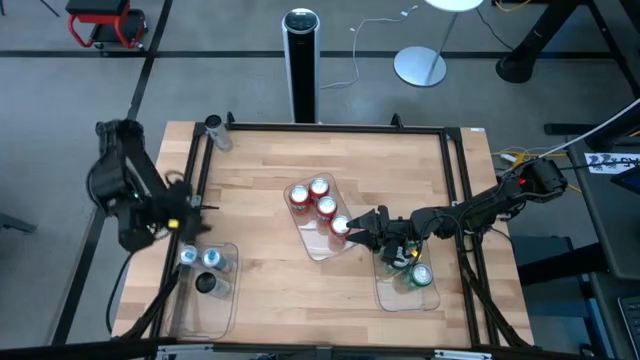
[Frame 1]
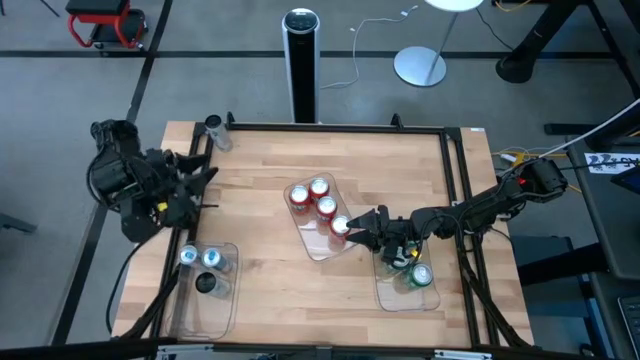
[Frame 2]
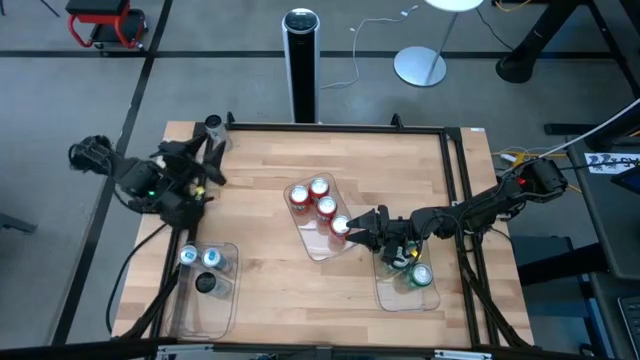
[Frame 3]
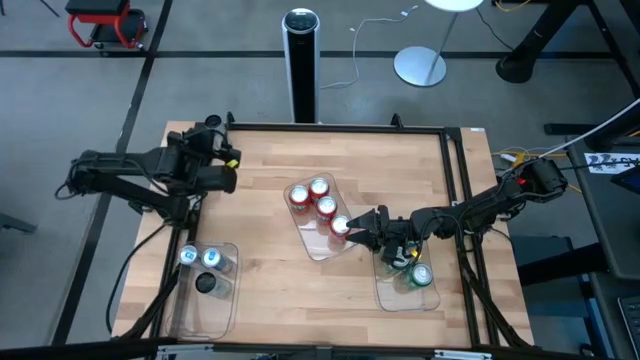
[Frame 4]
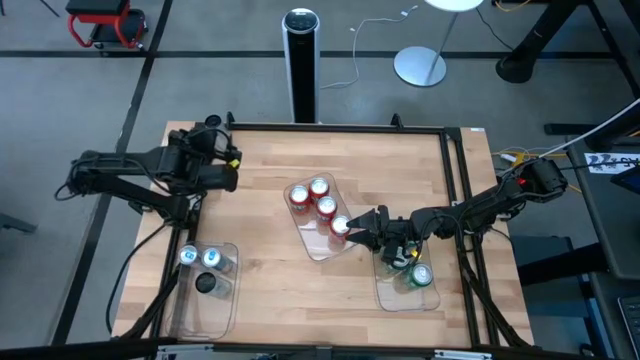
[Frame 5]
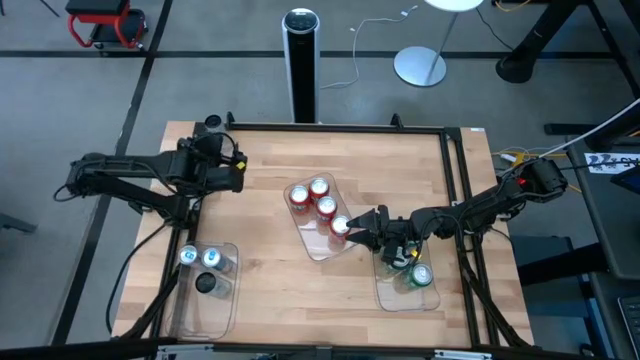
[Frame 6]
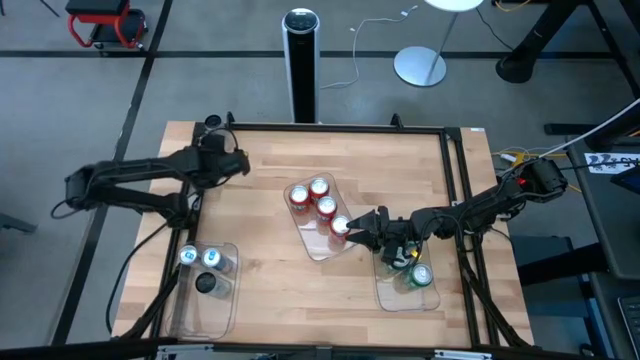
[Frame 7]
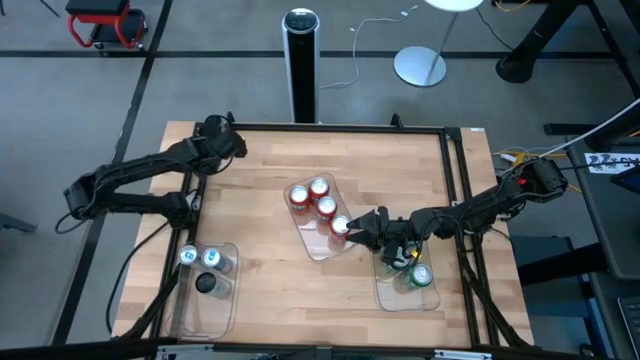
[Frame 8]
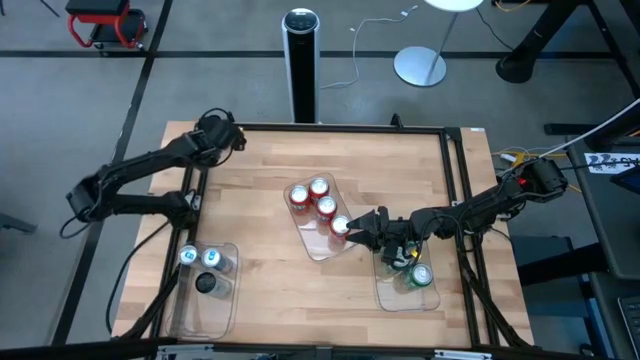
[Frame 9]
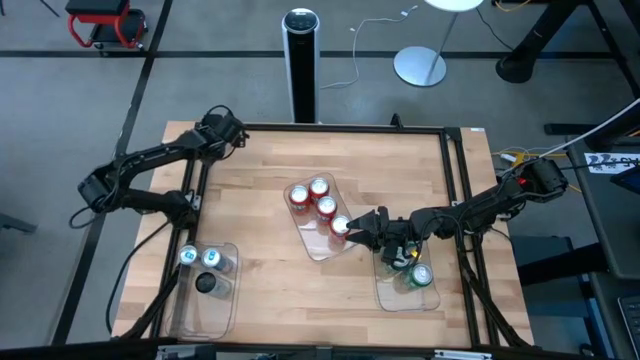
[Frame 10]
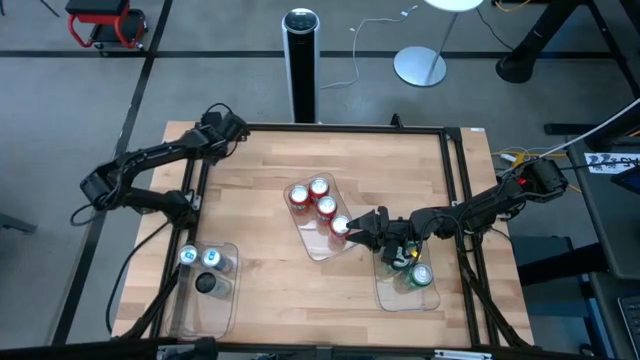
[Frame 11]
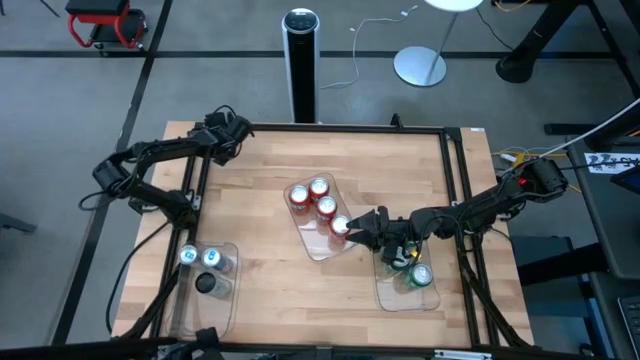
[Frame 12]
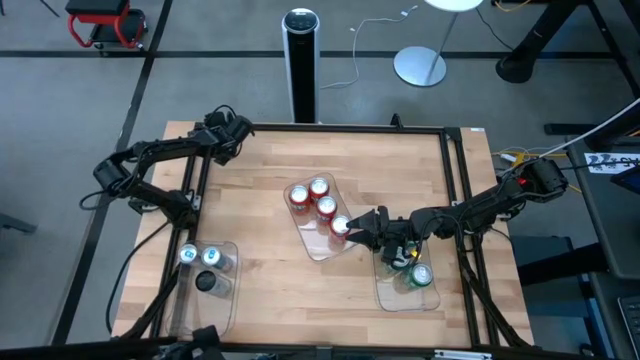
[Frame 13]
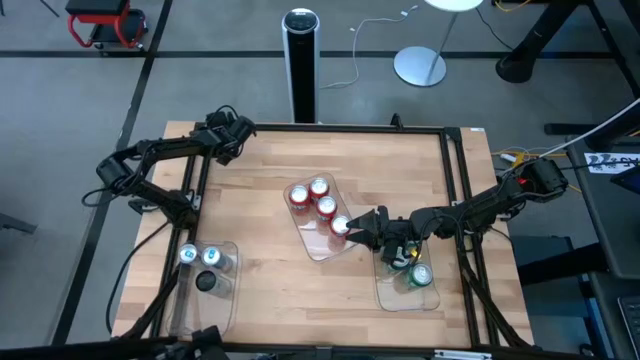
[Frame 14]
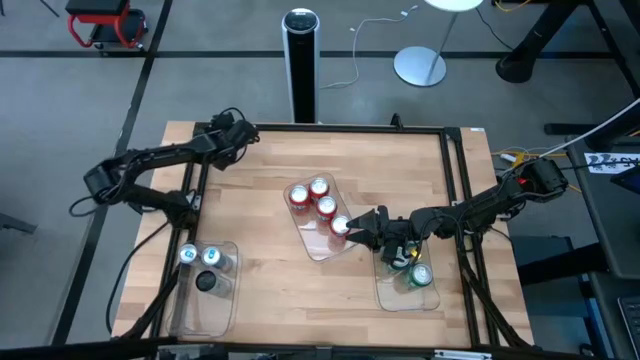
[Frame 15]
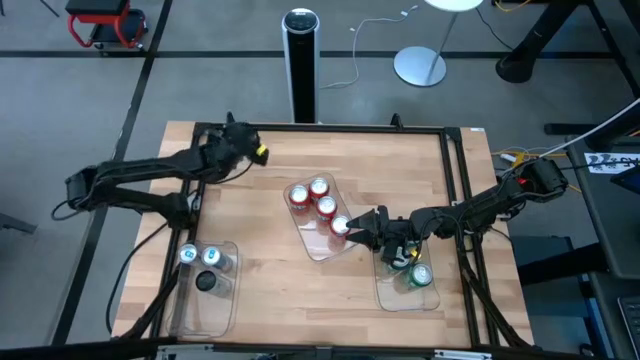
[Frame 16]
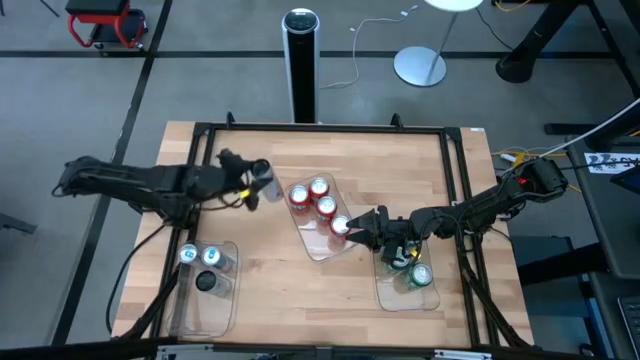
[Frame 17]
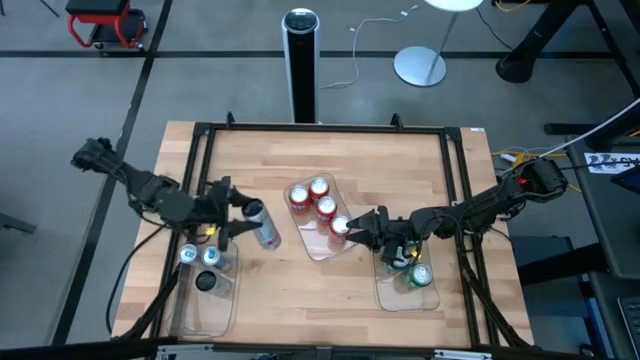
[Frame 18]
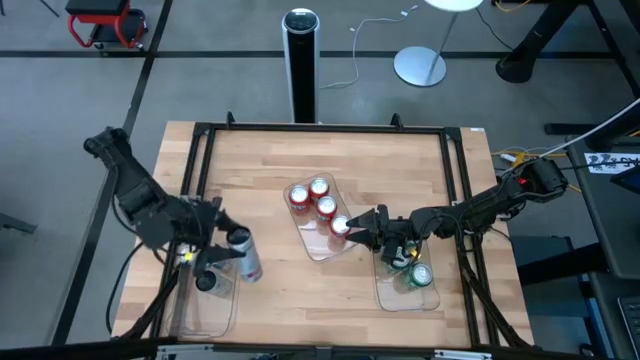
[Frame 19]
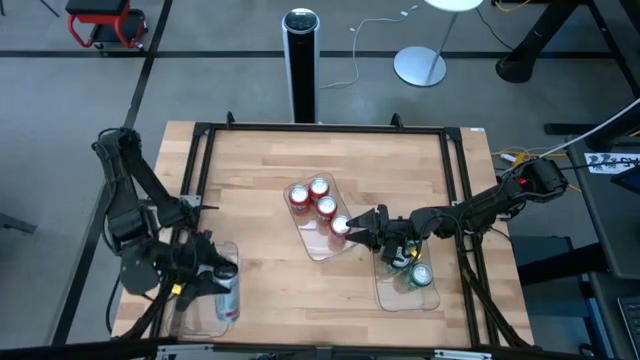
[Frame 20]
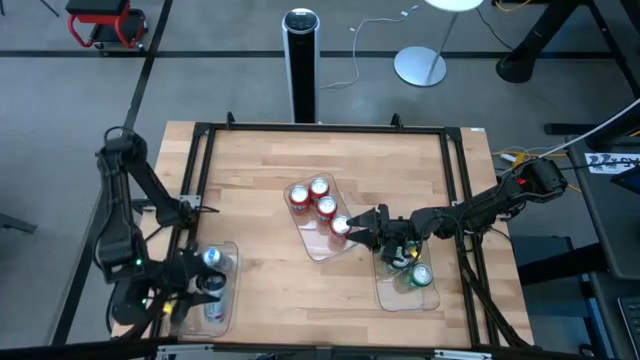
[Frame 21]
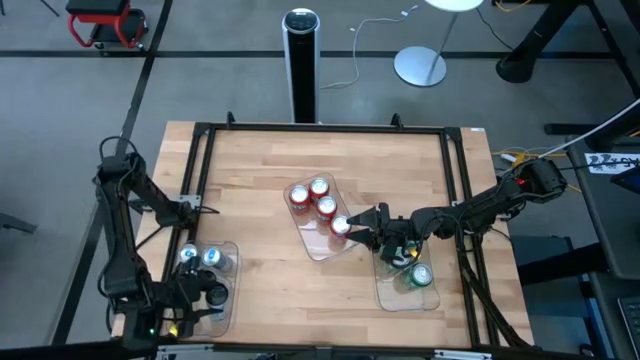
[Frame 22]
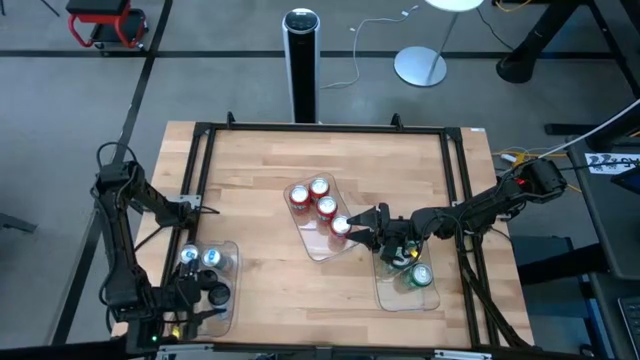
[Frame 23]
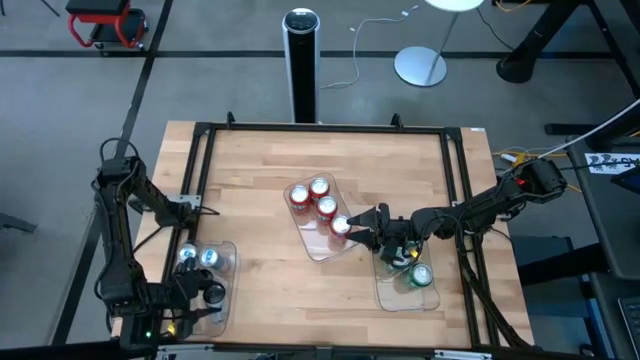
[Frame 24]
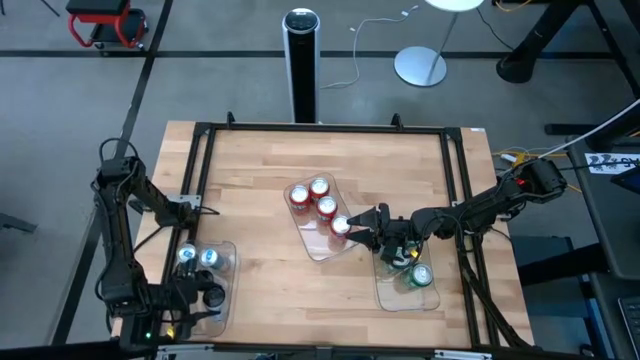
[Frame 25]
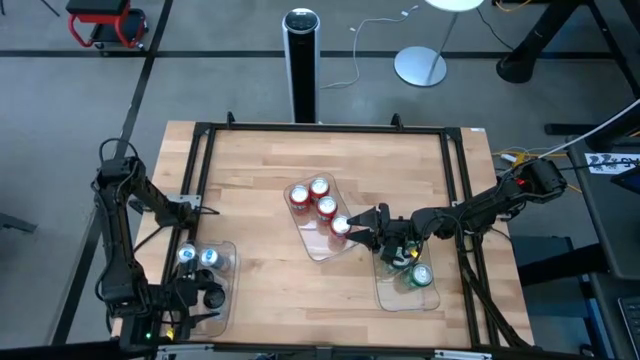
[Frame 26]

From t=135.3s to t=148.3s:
Task: Sort soda cans
Put the white-pink soda can into the left transparent bin

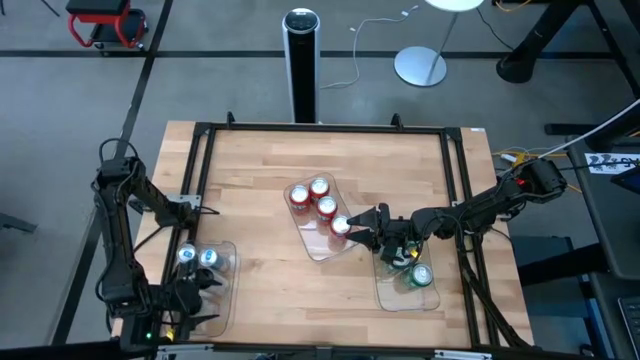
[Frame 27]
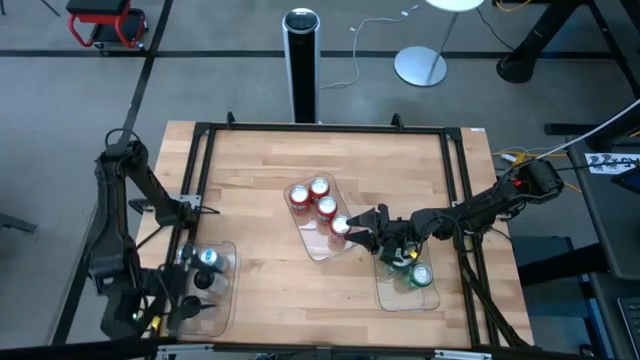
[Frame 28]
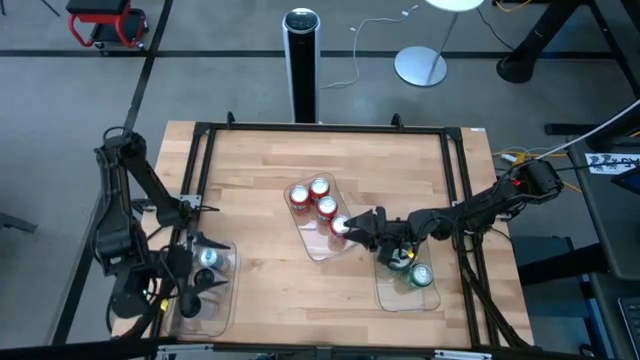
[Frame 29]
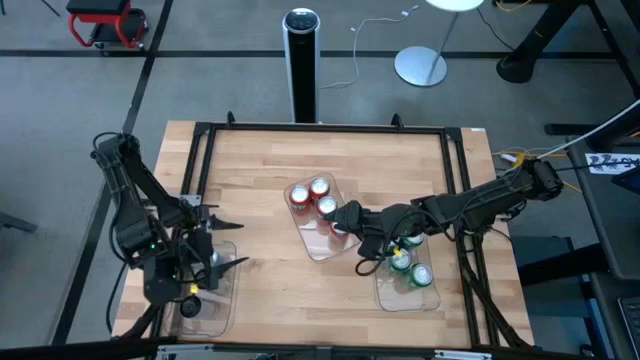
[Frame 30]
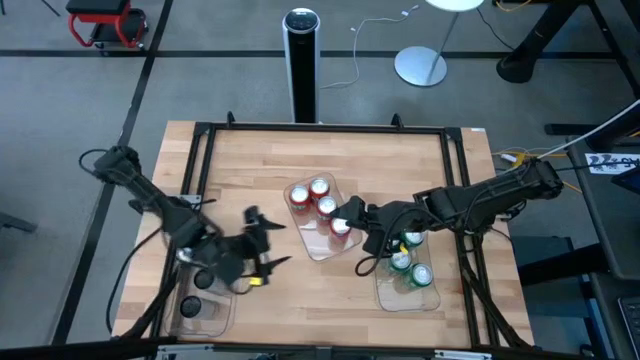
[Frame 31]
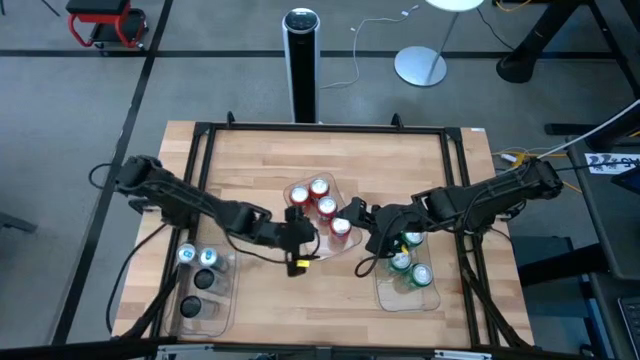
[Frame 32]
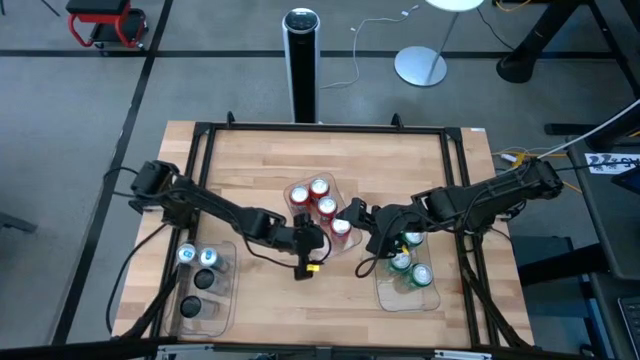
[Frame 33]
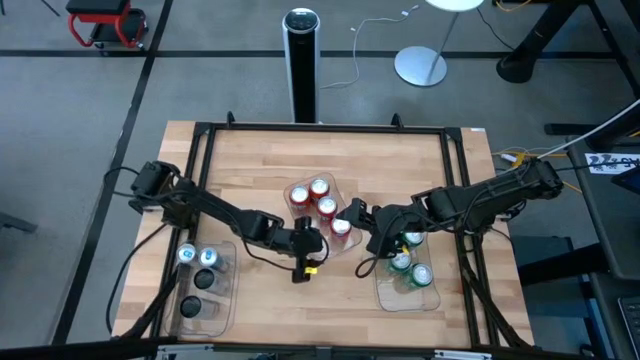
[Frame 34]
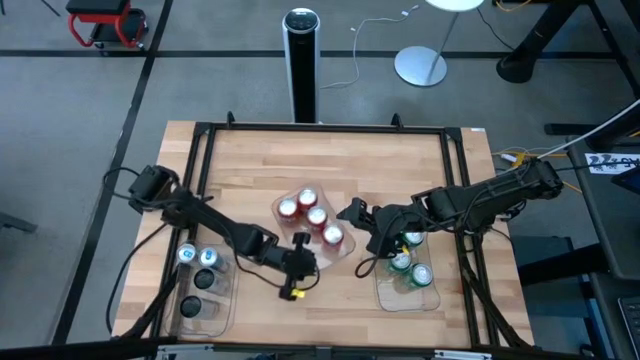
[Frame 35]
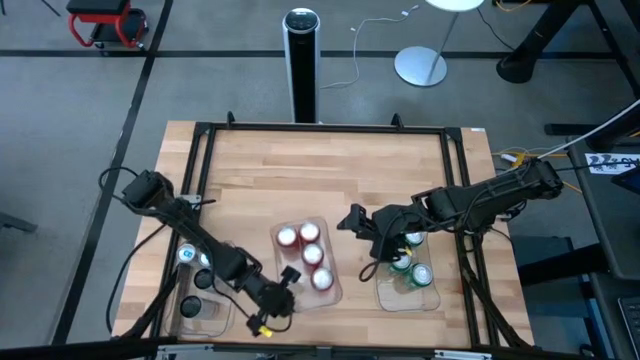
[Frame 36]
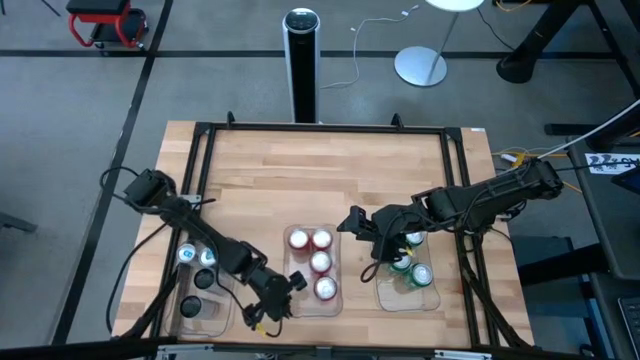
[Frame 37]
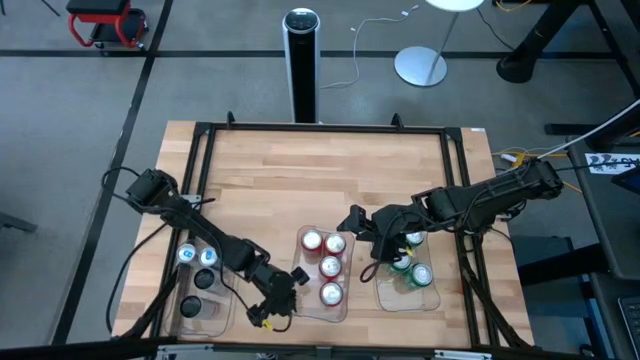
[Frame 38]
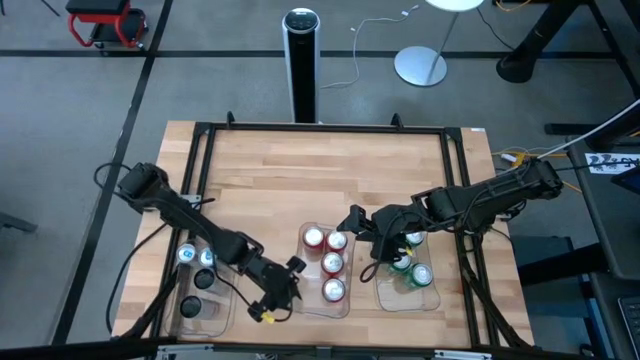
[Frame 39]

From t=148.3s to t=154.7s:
Adjust the middle transparent bin
